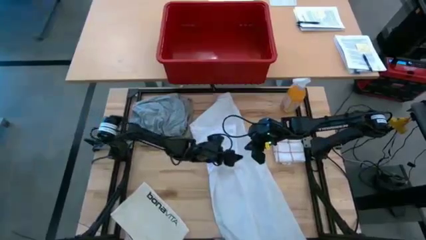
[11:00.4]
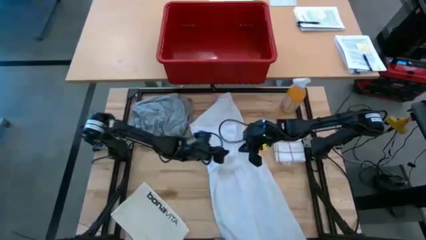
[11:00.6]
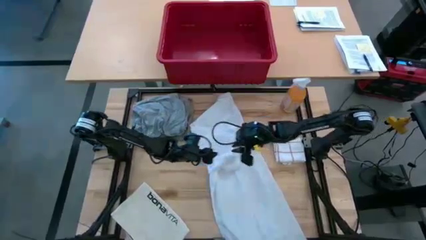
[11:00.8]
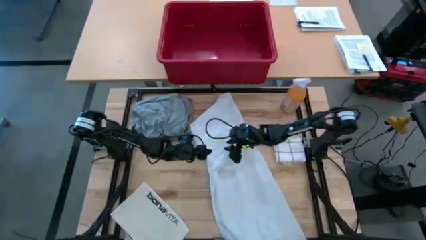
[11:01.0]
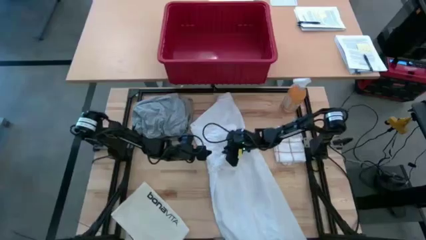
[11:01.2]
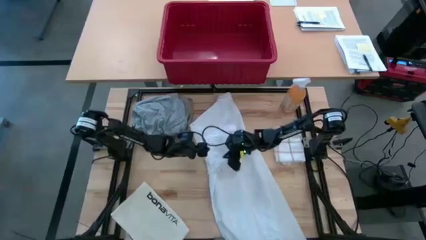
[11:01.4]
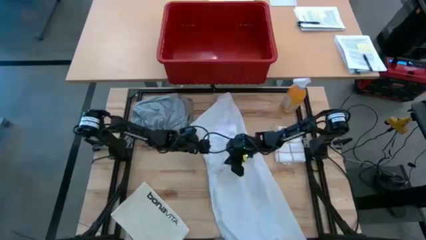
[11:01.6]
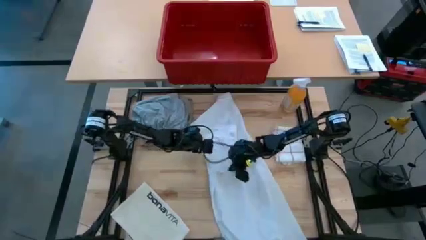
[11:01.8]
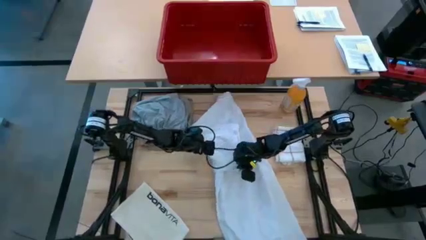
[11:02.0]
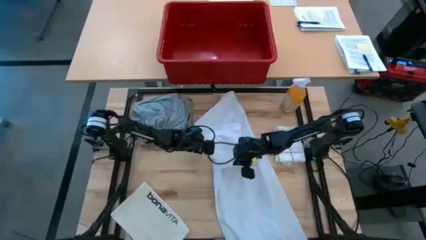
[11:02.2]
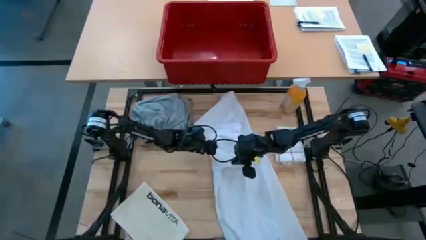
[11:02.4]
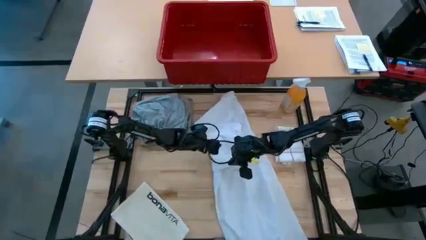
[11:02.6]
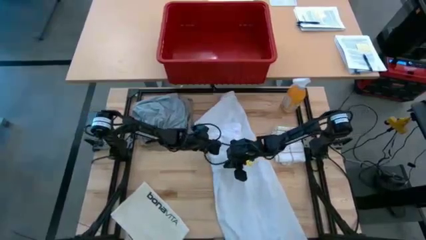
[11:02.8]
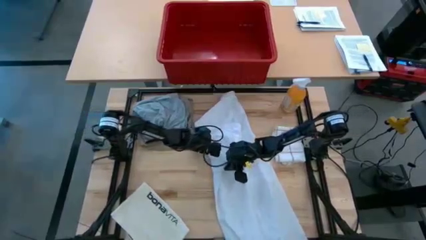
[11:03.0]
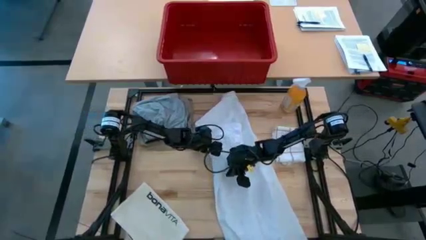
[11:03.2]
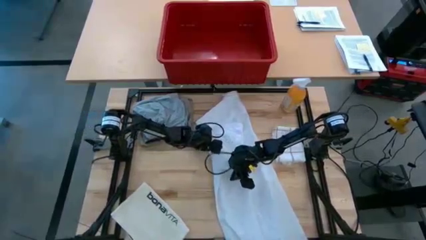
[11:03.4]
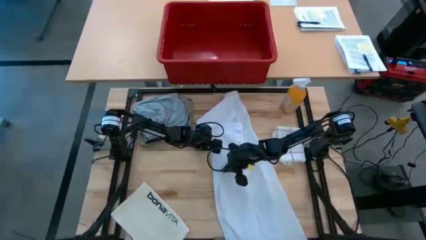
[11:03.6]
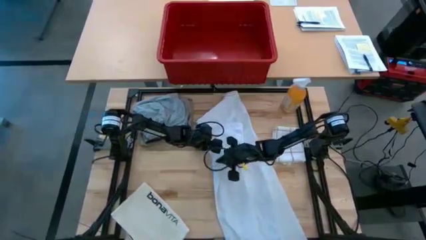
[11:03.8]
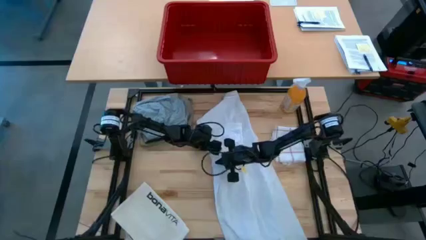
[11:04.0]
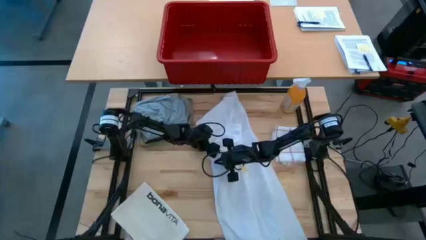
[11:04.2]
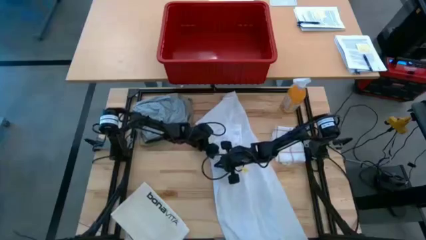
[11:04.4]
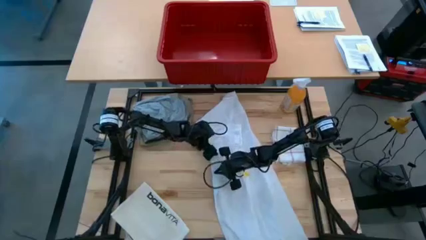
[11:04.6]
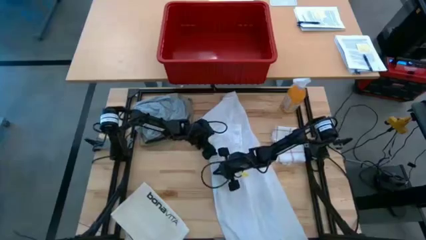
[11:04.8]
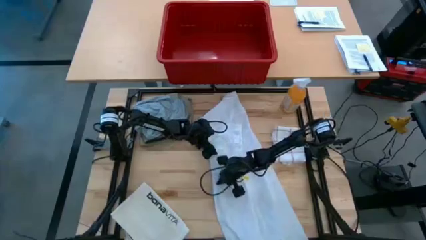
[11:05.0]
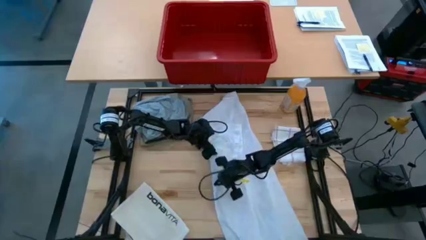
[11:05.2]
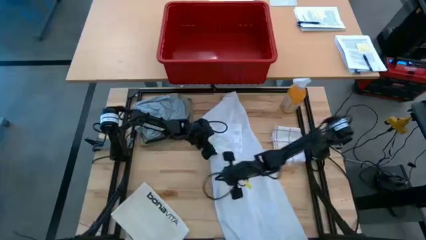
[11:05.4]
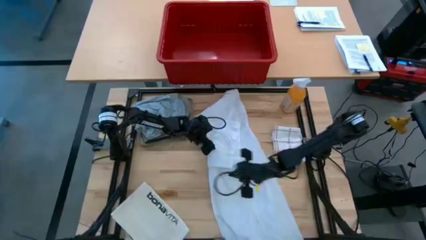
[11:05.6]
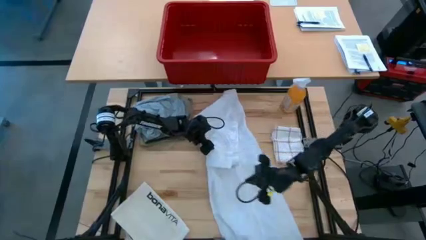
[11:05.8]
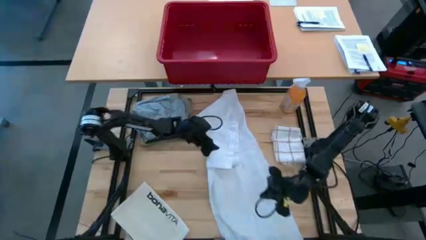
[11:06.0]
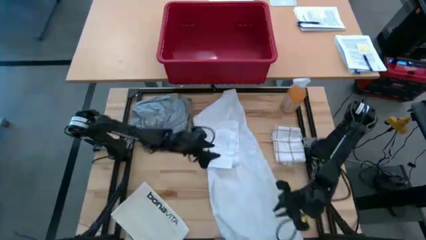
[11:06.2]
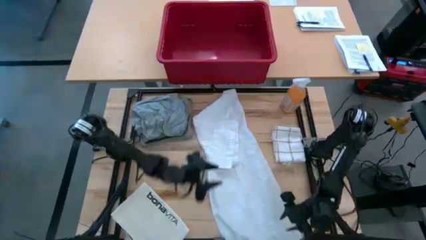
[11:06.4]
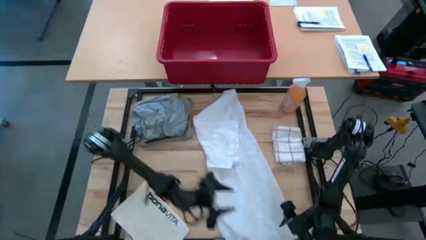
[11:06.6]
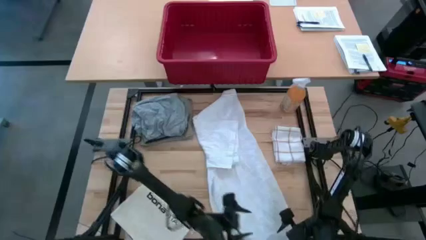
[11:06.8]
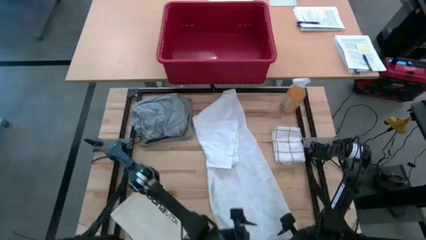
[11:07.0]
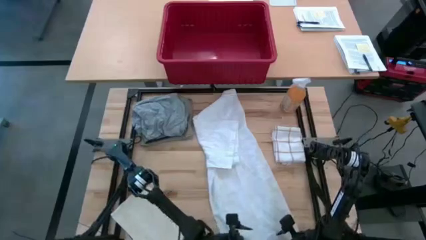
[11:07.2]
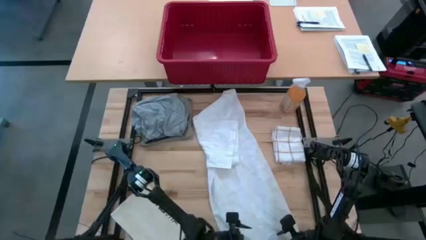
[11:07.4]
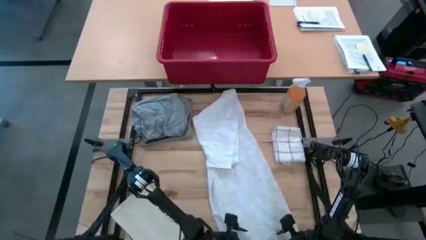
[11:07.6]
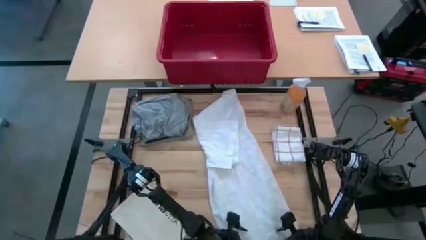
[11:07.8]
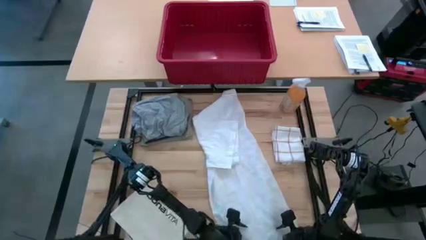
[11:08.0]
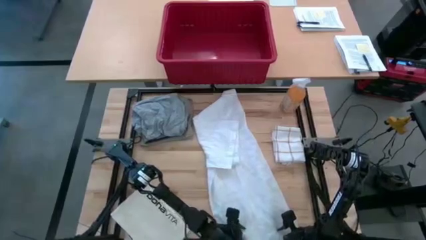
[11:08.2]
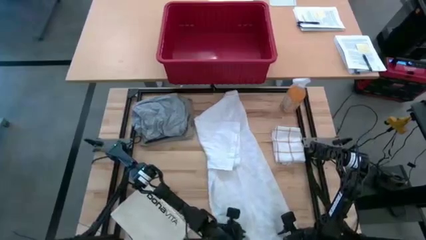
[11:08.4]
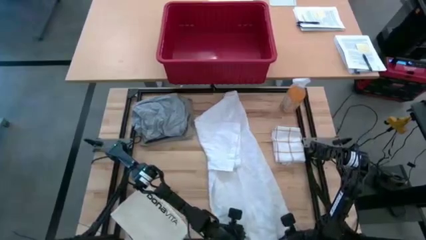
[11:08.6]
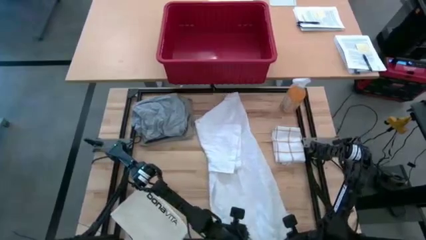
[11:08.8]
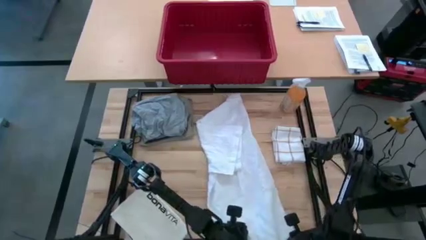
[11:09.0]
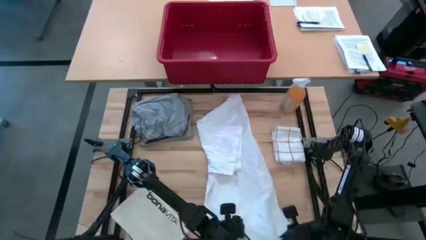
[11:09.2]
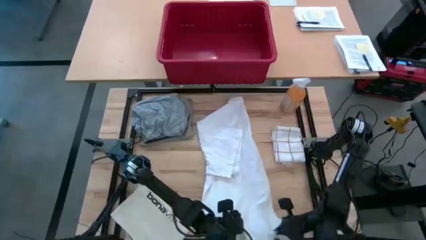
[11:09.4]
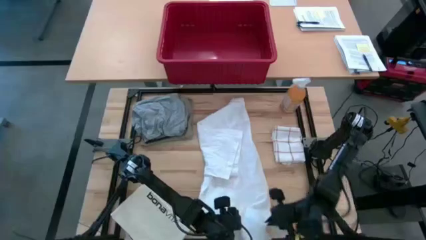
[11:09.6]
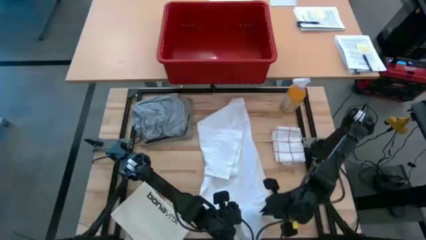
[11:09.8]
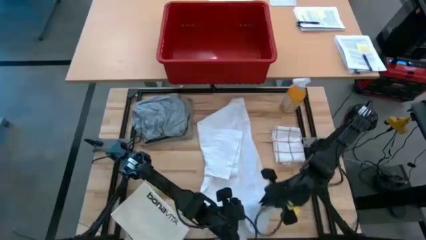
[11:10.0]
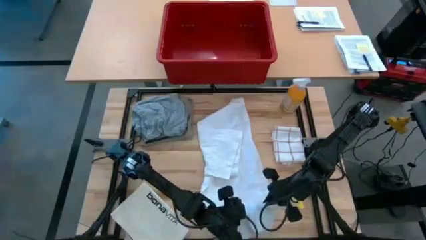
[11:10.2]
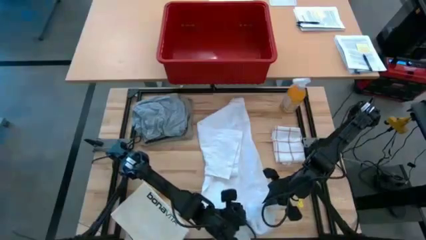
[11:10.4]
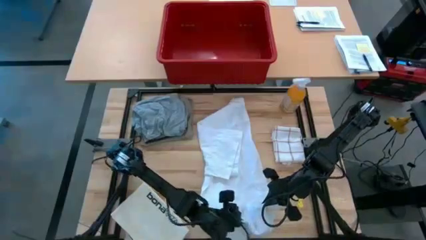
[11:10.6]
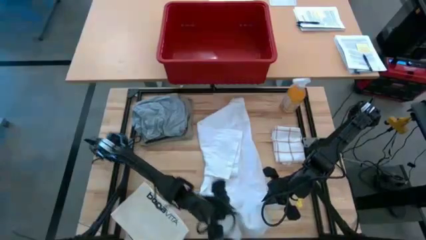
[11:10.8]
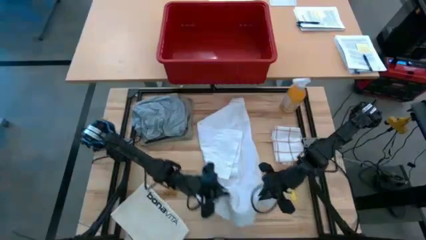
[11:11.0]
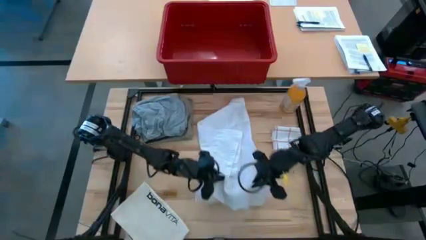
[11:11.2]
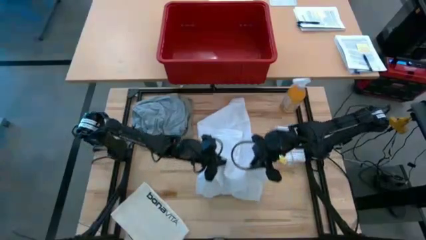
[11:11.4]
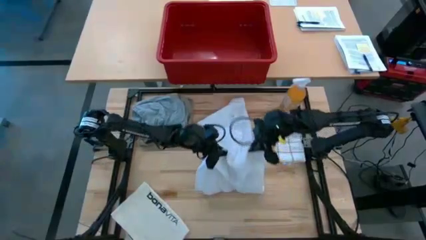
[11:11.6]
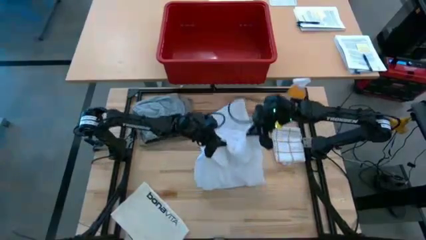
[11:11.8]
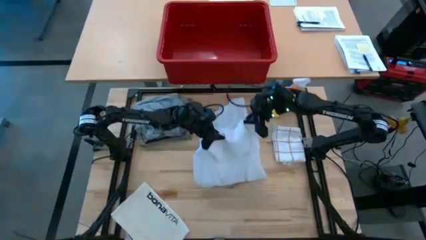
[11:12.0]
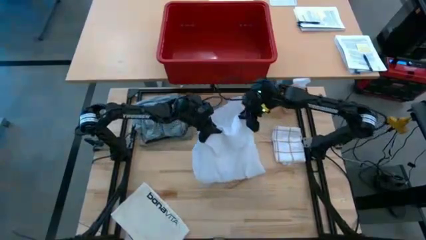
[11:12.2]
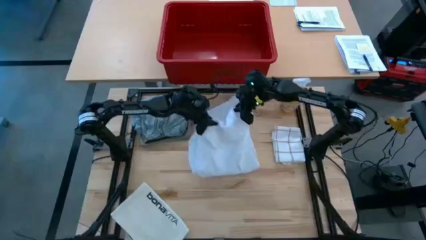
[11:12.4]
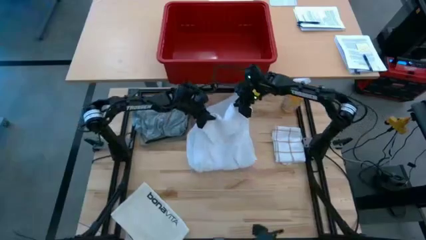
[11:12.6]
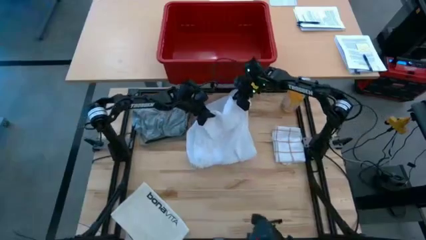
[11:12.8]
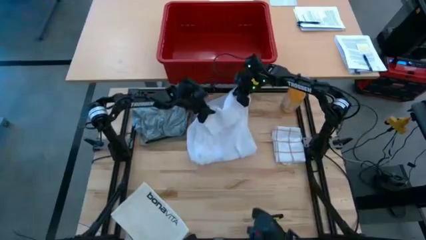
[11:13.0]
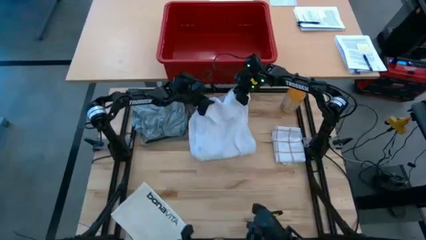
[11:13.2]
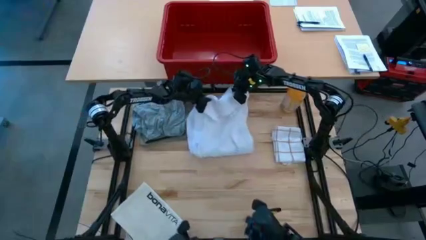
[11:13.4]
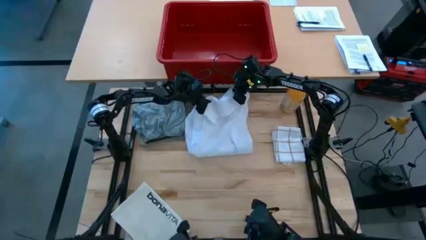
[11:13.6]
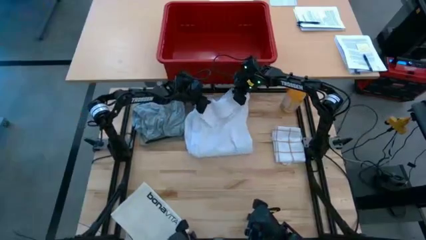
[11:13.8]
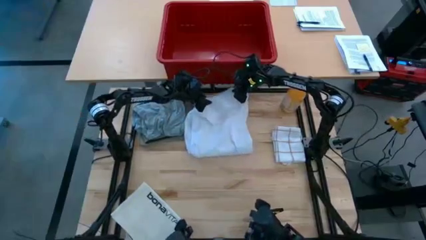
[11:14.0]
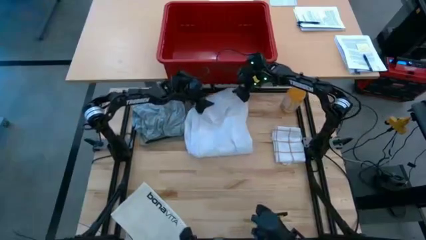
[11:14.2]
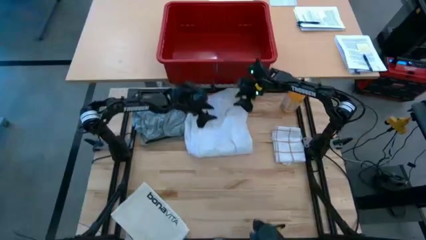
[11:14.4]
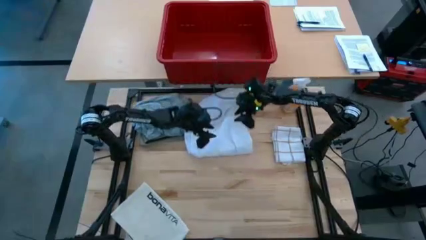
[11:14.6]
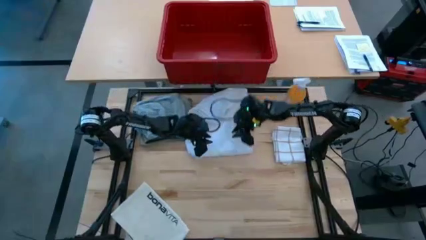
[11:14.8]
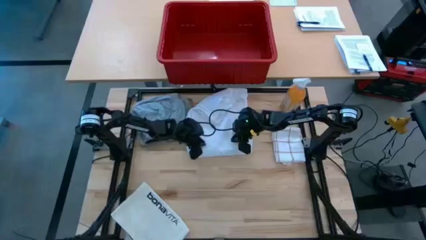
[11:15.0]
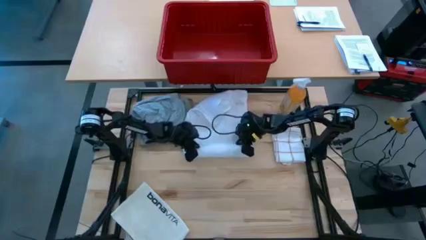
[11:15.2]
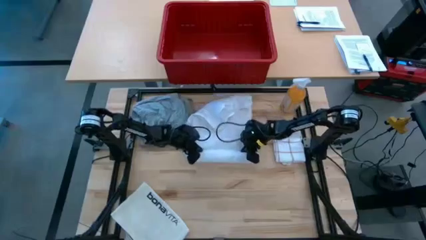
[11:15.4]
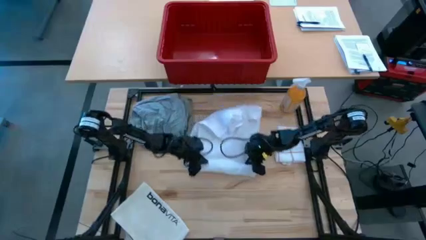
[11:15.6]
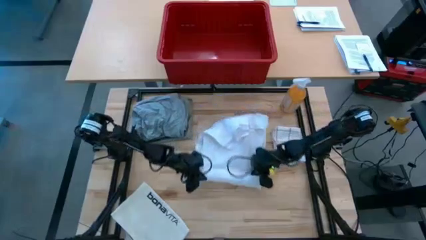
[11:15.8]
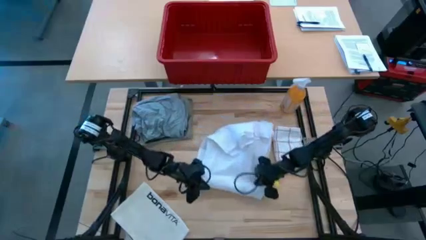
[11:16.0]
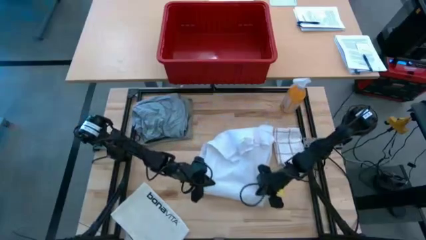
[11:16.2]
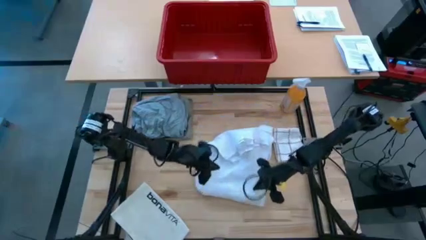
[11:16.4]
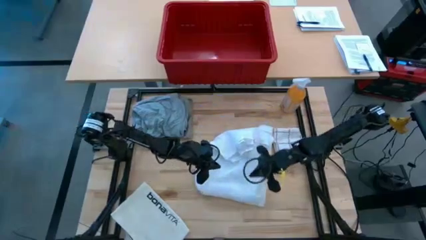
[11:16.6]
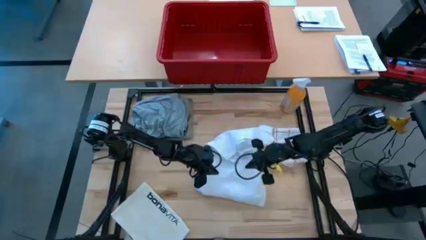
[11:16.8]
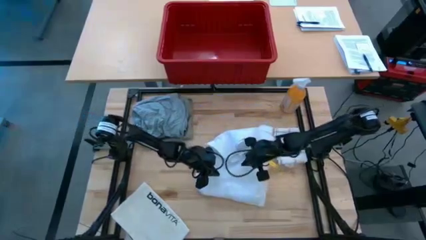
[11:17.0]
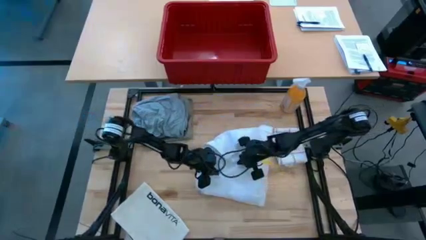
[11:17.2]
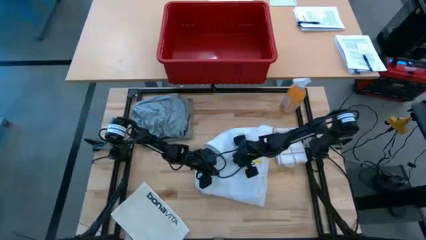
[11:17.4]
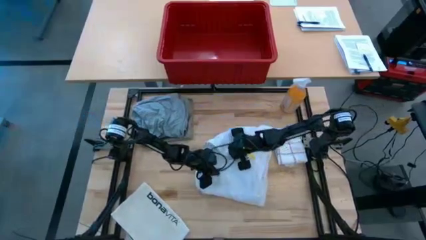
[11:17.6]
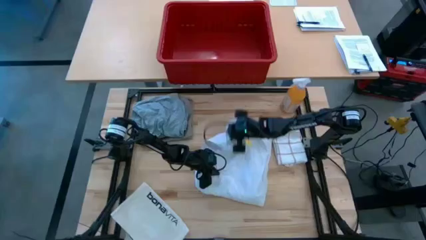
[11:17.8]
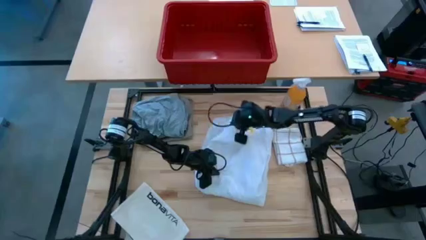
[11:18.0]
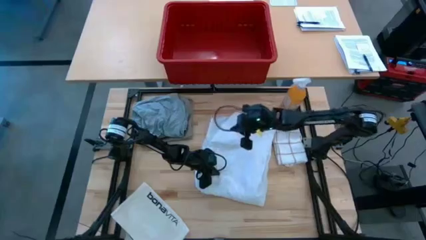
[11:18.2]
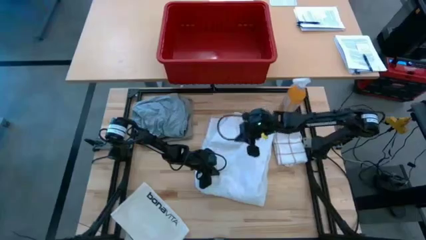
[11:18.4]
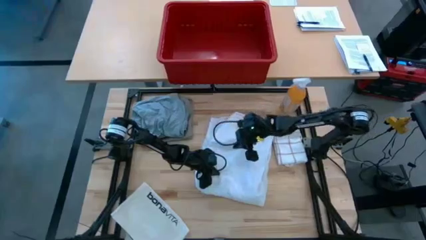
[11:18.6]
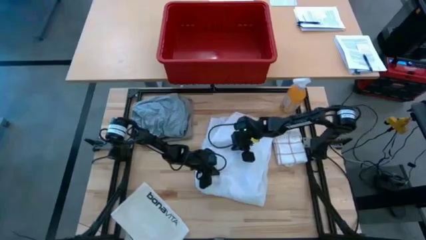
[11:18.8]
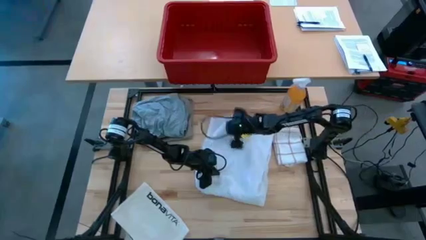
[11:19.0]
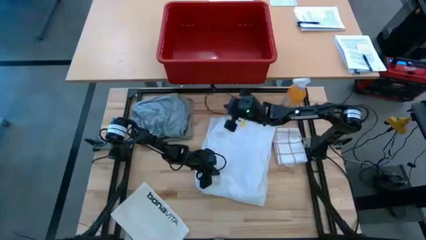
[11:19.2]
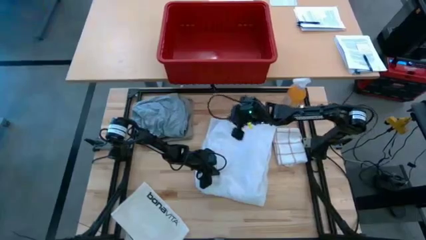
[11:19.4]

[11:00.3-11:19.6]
Task: Fold laundry
Fold the white long sleeve shirt
